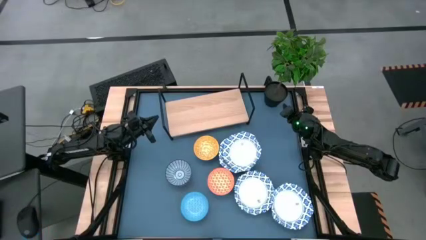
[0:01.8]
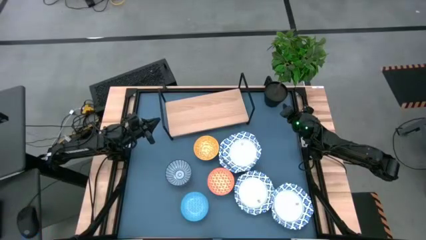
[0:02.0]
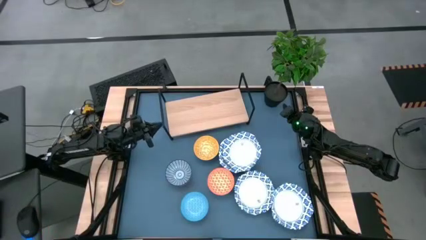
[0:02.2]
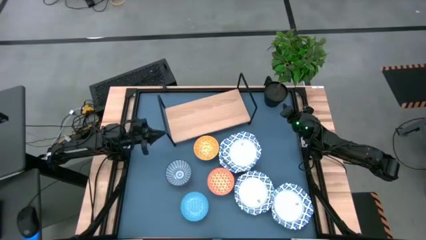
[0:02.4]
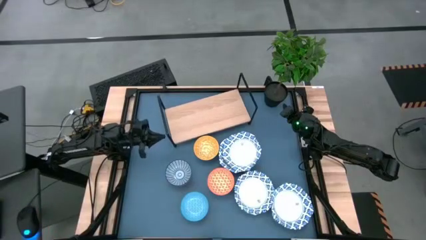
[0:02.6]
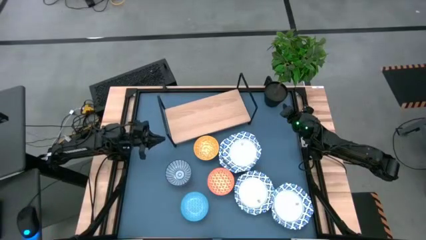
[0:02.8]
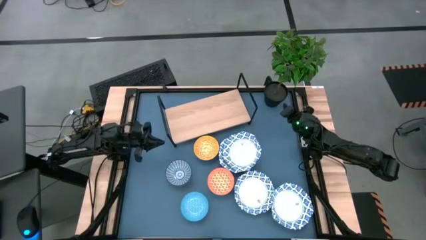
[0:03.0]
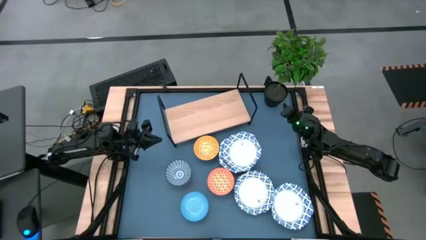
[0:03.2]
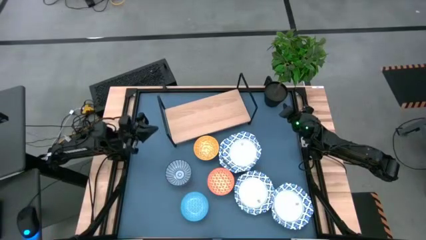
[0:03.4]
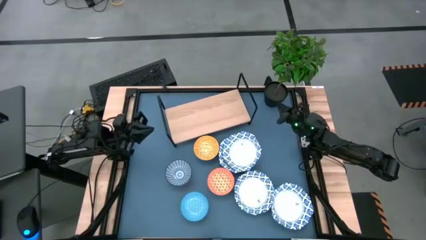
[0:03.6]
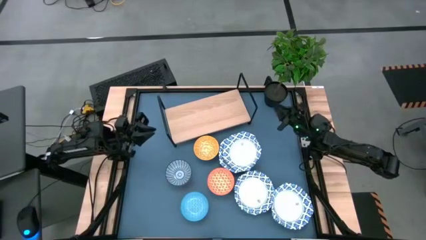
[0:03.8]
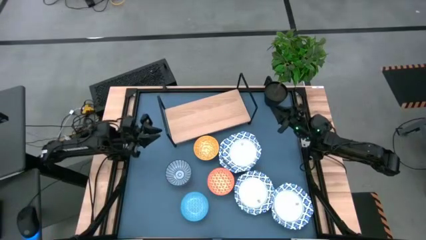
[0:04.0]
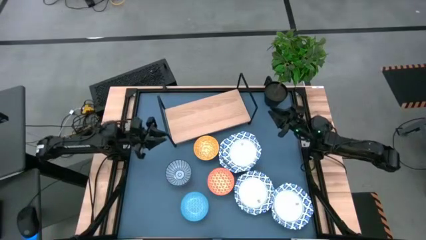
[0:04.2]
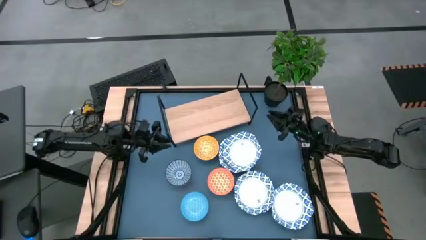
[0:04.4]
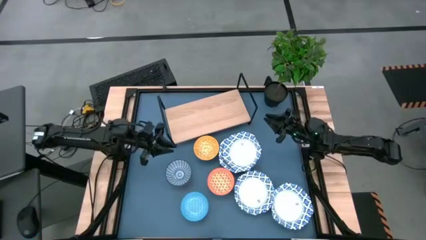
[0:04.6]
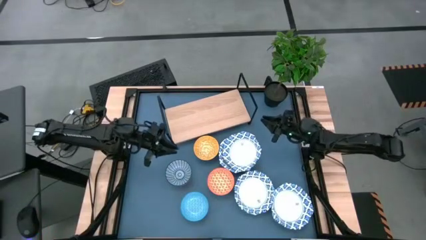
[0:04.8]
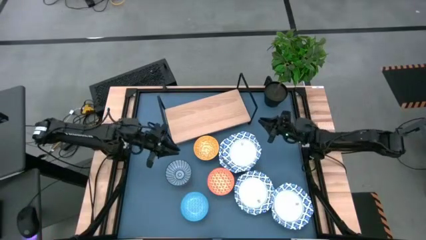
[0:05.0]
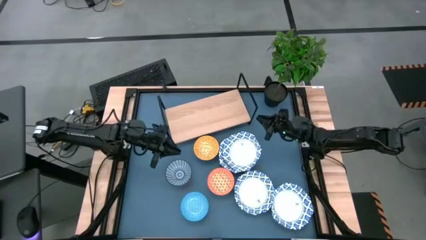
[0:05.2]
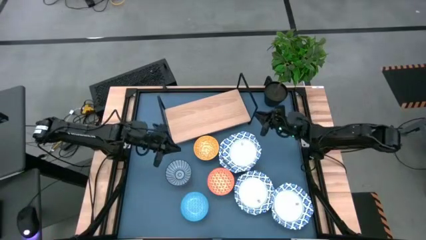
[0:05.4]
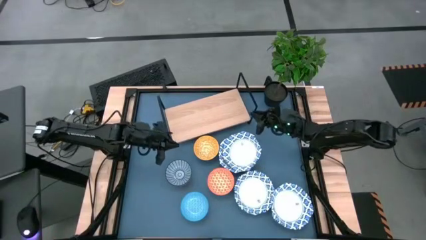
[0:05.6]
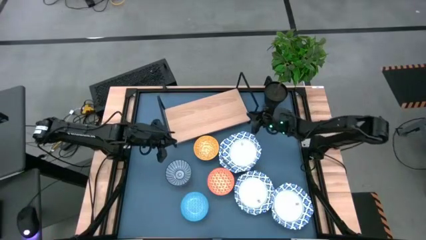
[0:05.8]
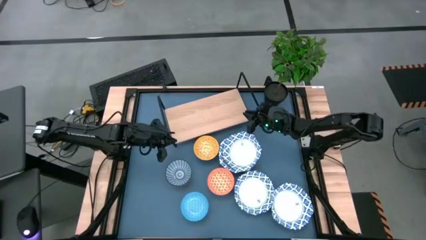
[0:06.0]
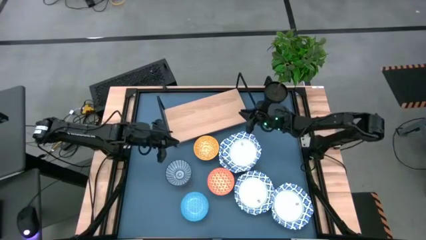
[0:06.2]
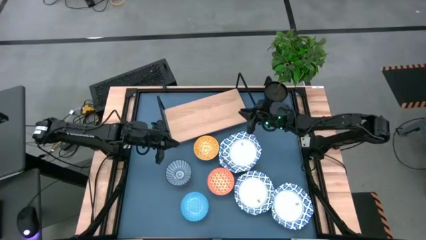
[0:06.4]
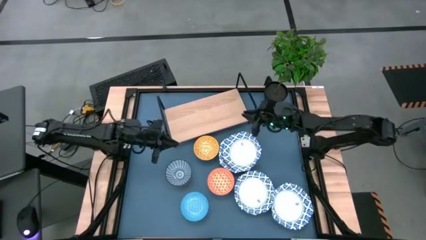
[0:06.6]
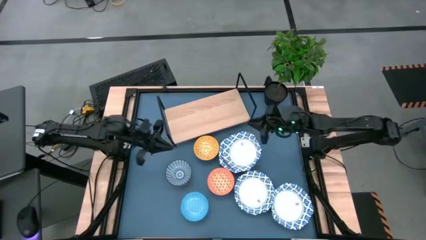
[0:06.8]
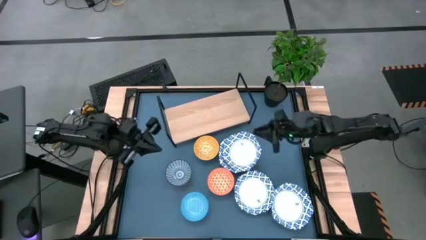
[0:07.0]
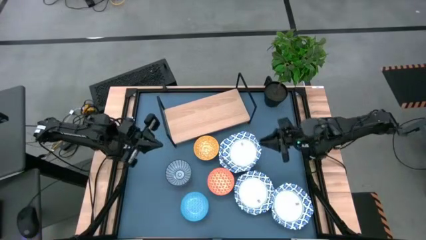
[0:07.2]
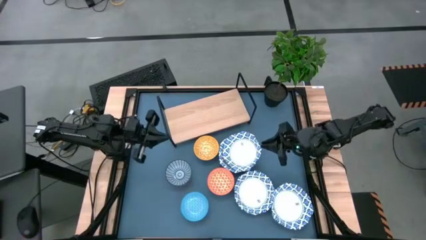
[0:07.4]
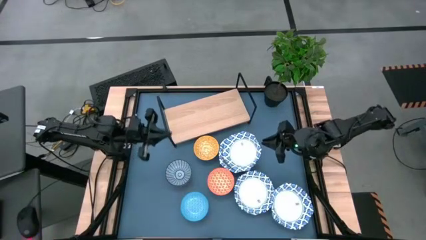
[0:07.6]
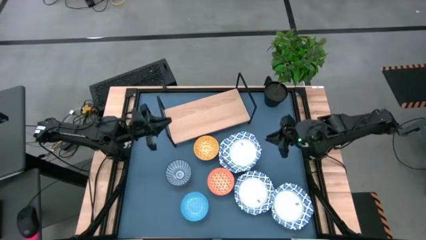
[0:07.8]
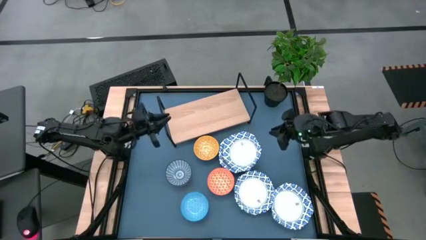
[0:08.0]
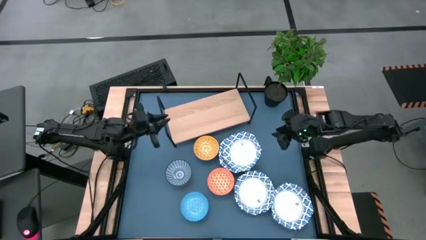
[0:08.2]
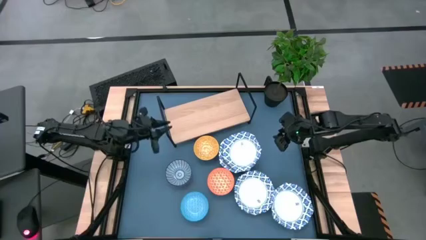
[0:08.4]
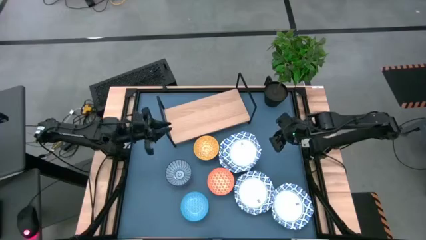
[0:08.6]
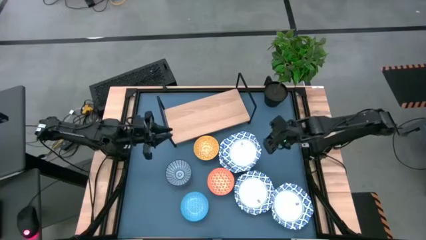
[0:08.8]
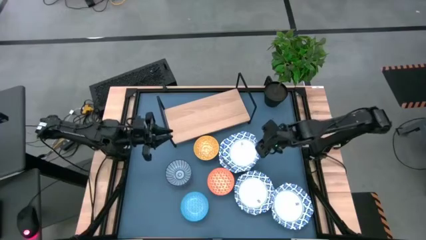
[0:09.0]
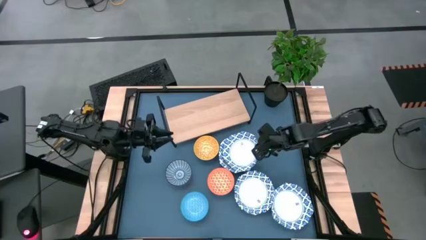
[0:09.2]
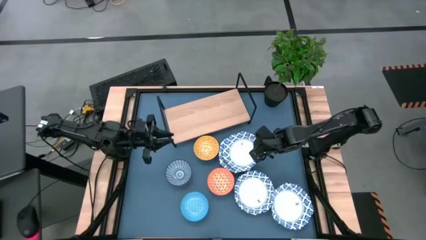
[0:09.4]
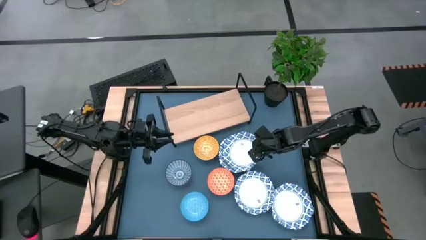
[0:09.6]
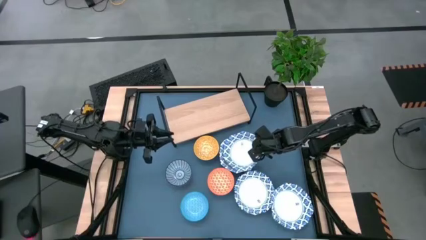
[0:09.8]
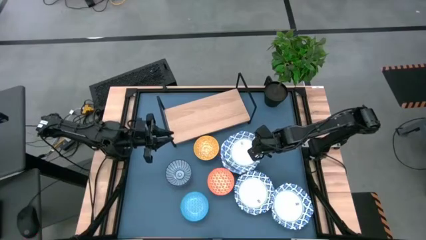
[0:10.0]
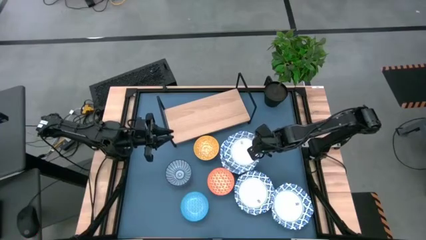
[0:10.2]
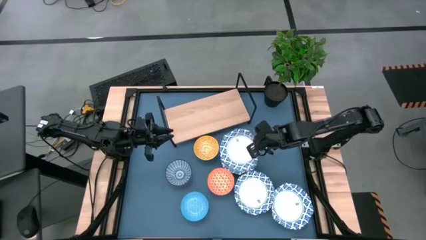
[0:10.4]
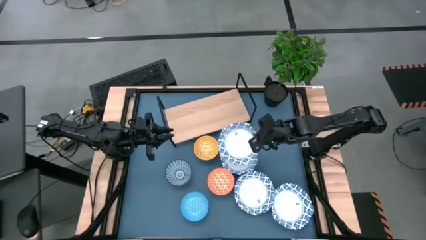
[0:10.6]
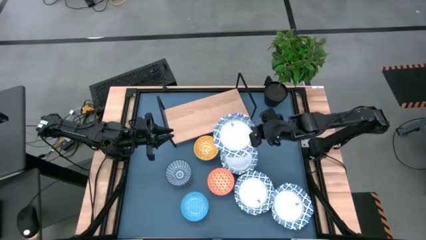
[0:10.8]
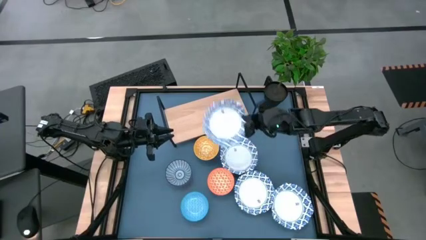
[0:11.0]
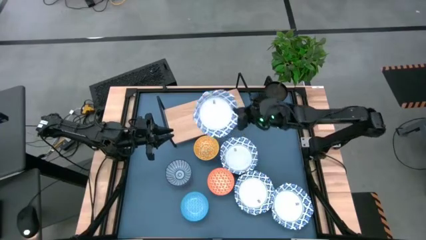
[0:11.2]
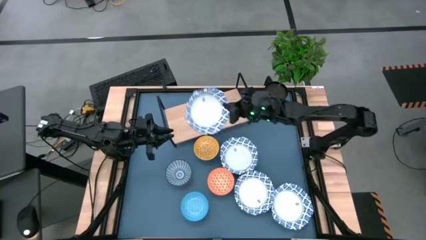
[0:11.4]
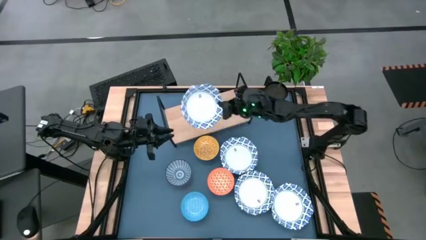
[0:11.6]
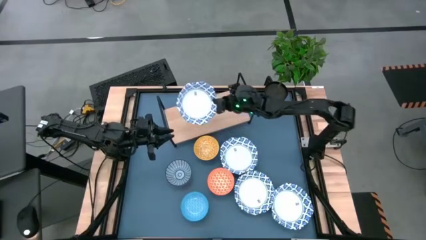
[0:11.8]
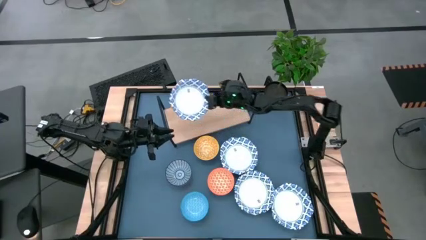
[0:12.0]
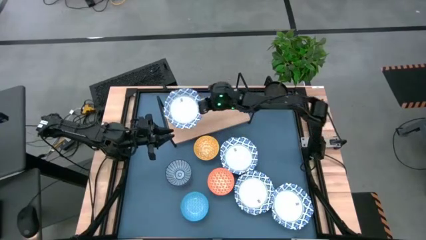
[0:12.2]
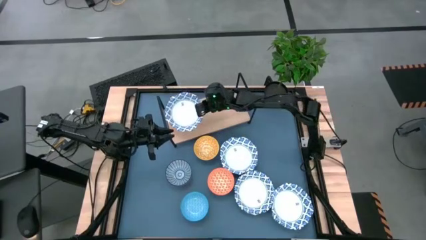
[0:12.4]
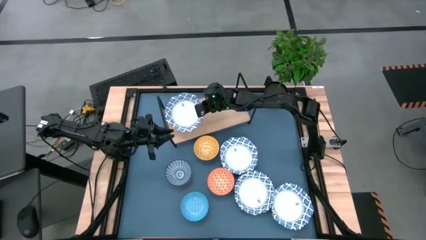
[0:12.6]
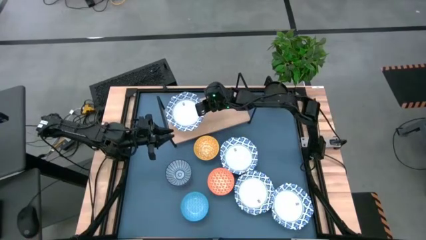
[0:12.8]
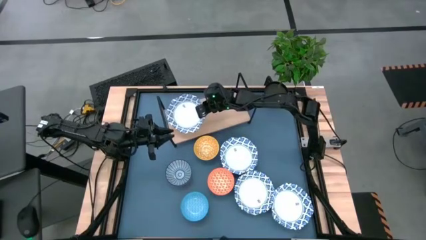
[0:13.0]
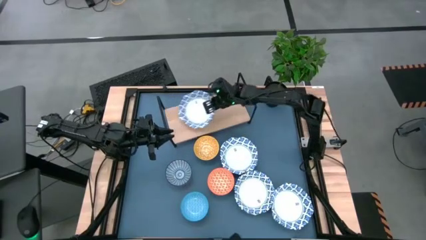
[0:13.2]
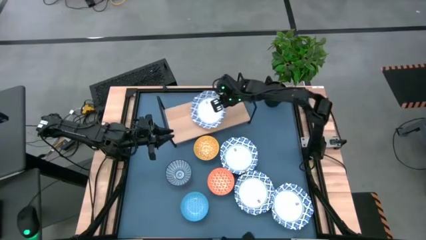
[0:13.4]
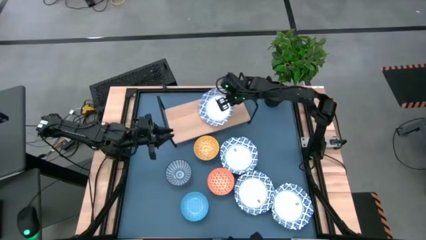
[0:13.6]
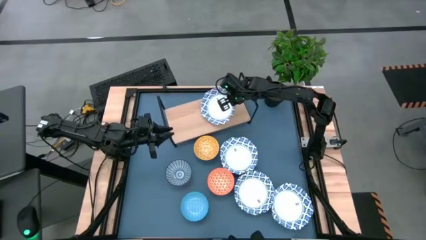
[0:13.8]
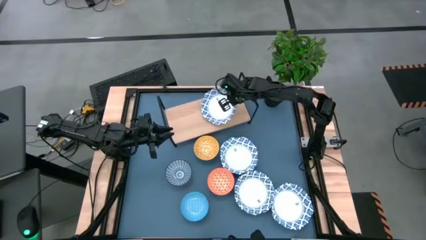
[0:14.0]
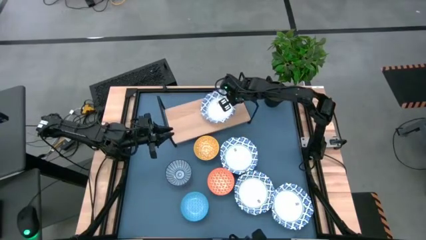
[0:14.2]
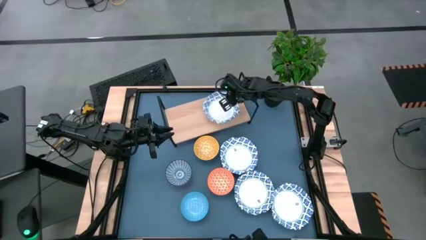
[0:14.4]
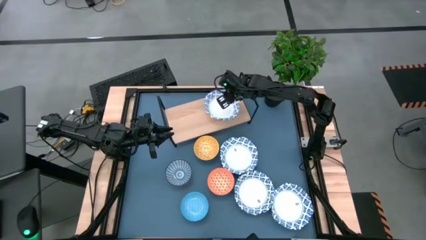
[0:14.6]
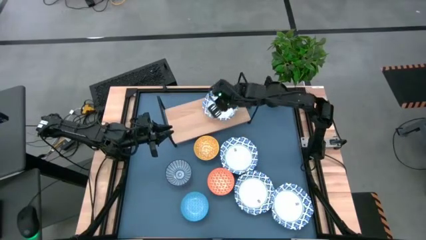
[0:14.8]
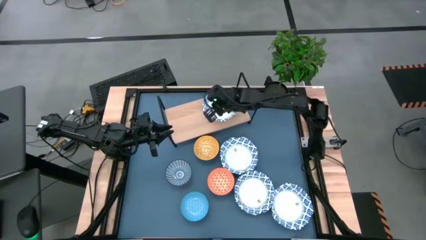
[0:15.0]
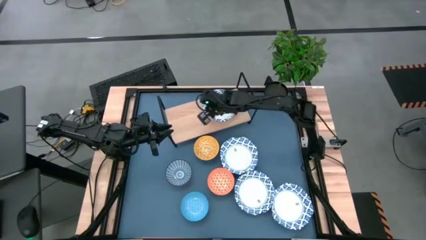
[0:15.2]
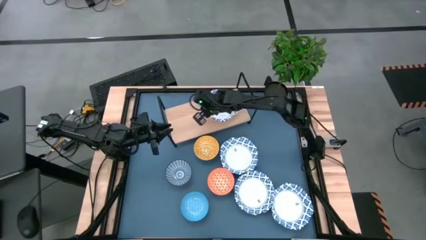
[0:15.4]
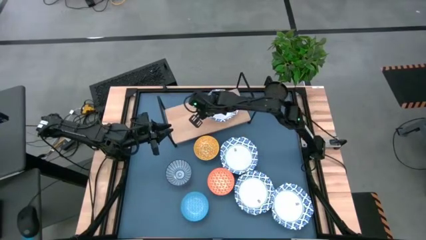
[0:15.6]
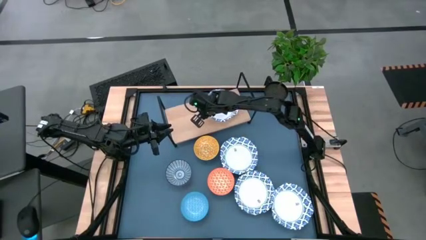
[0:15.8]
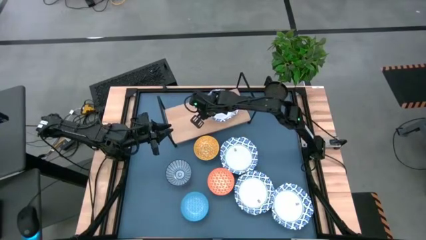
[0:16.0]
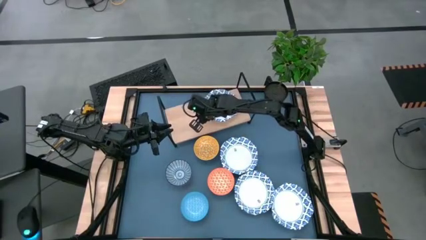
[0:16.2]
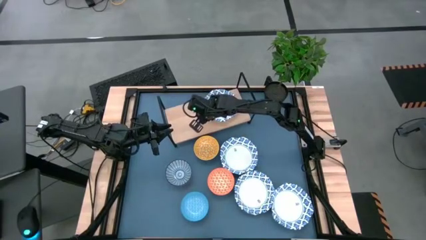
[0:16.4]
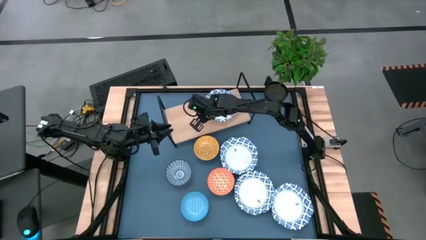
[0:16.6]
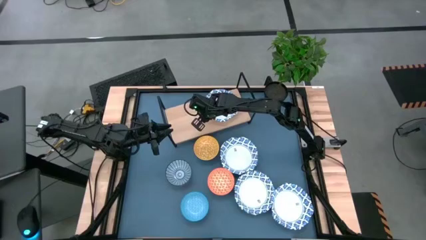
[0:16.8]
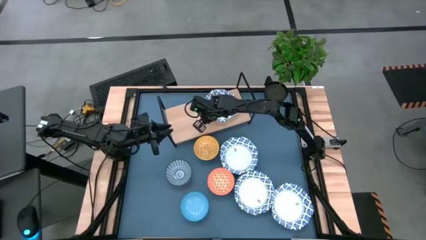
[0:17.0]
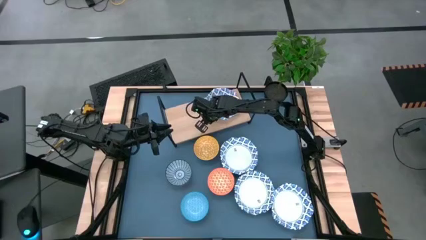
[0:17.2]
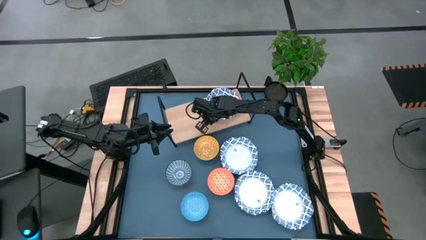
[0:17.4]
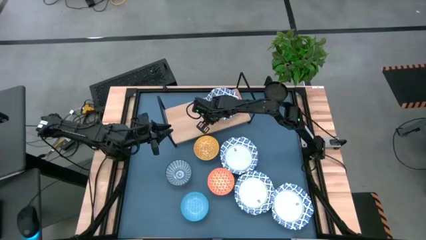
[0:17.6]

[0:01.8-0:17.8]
Task: Place and stack bowls onto a shelf
Put the white patterned bowl on the shelf

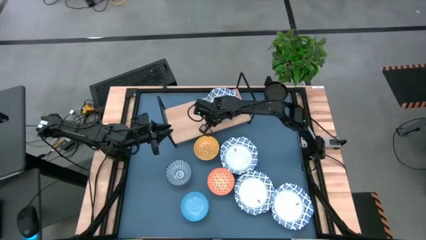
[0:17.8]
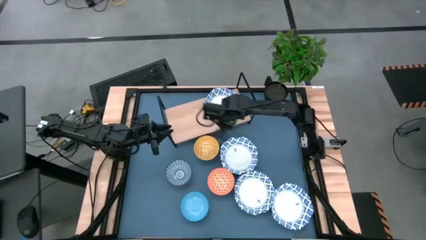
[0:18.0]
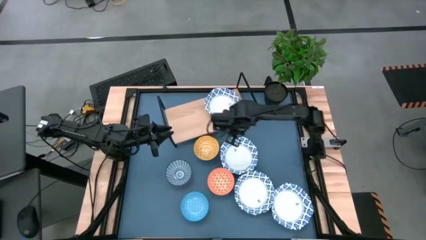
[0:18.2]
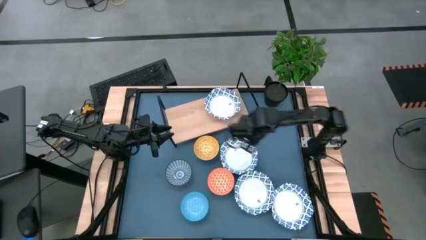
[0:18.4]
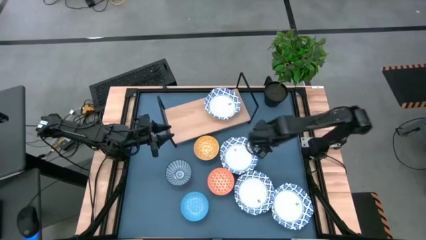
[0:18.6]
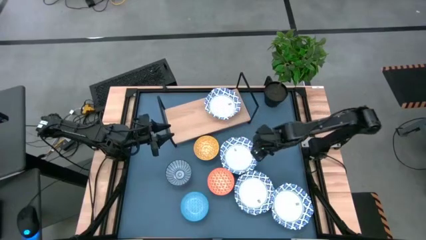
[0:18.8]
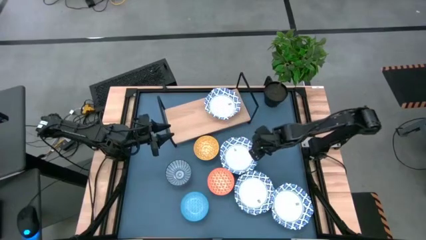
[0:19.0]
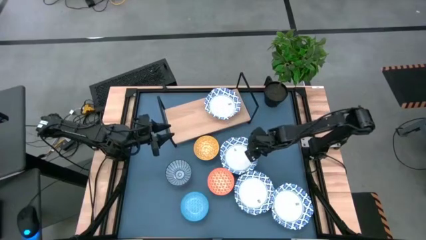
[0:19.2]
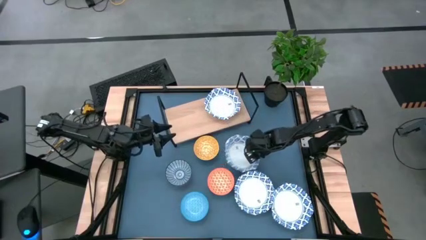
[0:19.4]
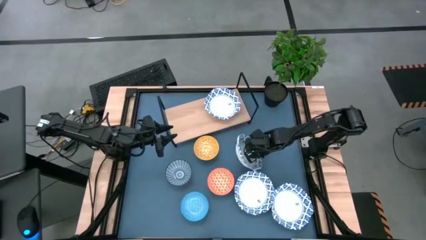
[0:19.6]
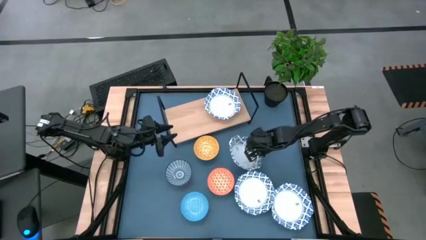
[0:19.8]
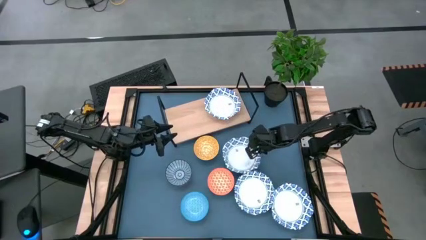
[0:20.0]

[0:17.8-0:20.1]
Stack the white patterned bowl on top of the white patterned bowl on the shelf
